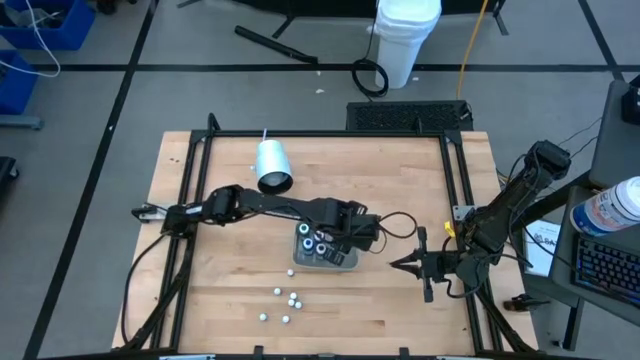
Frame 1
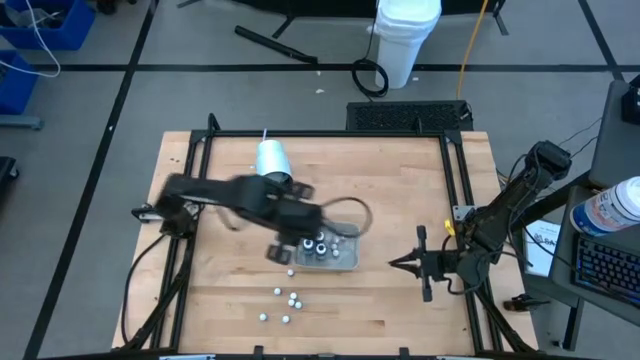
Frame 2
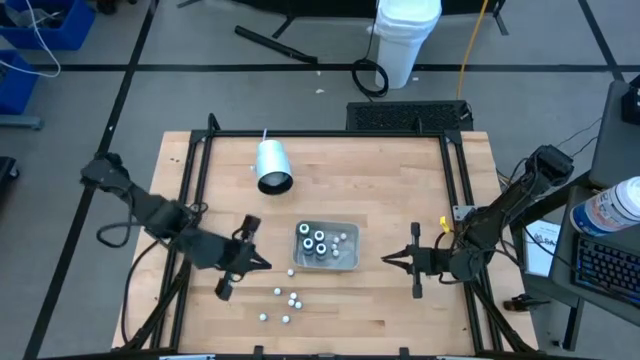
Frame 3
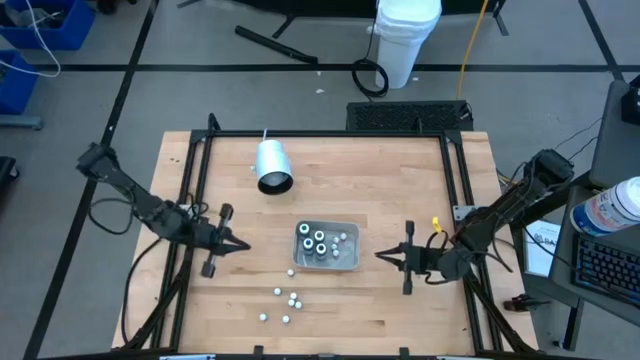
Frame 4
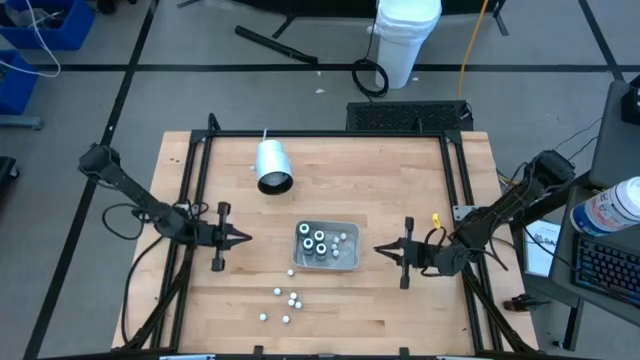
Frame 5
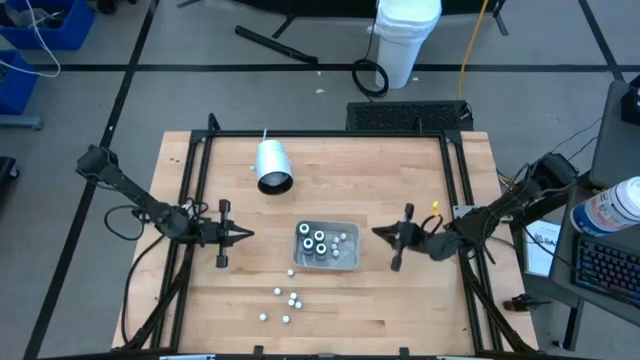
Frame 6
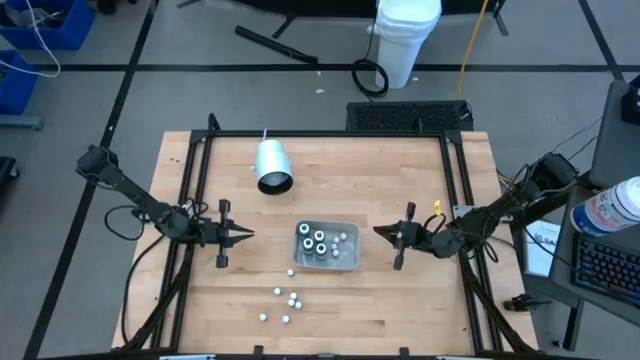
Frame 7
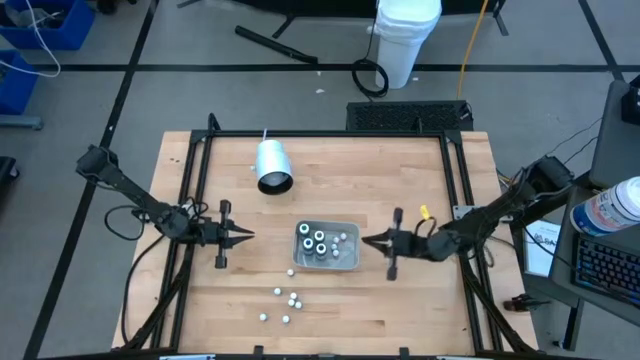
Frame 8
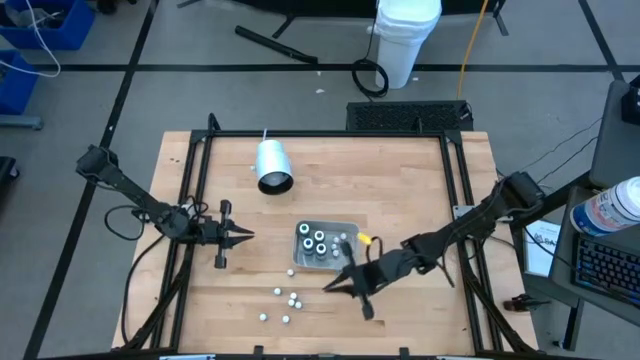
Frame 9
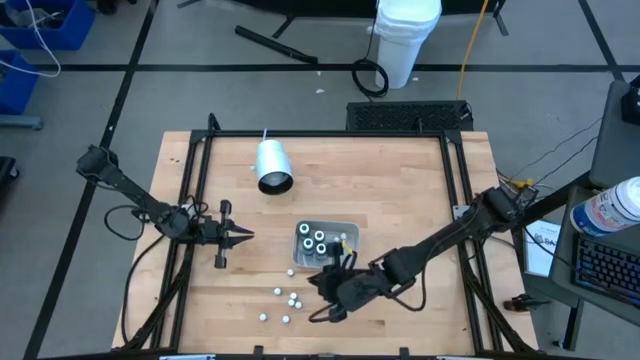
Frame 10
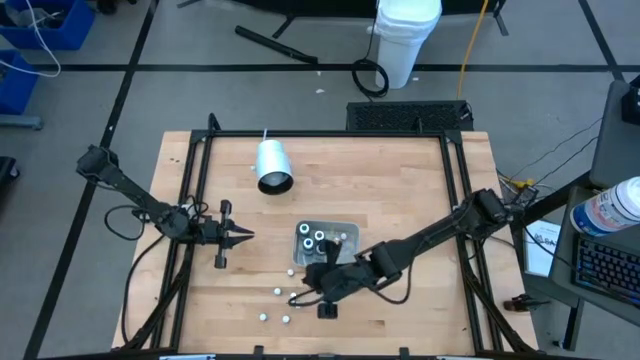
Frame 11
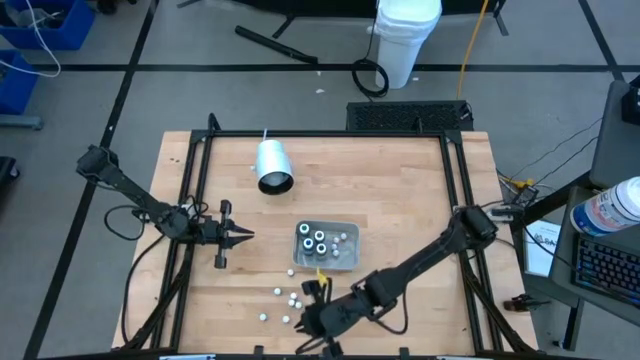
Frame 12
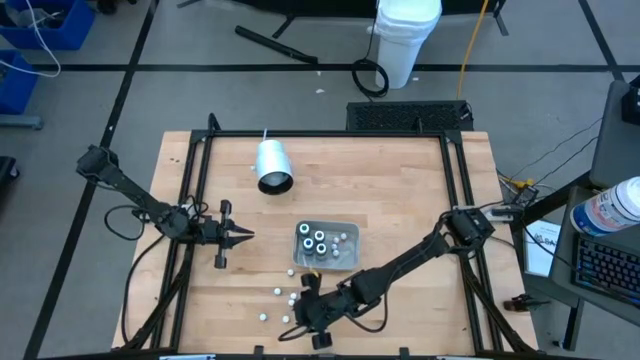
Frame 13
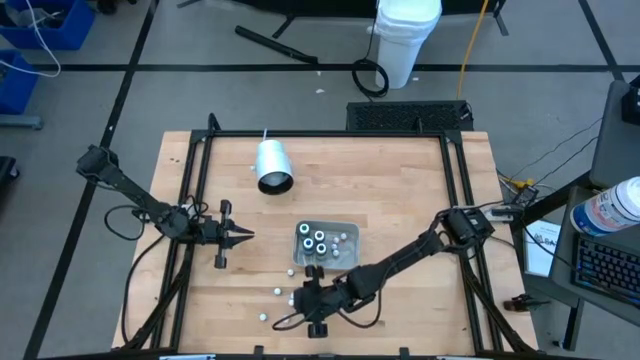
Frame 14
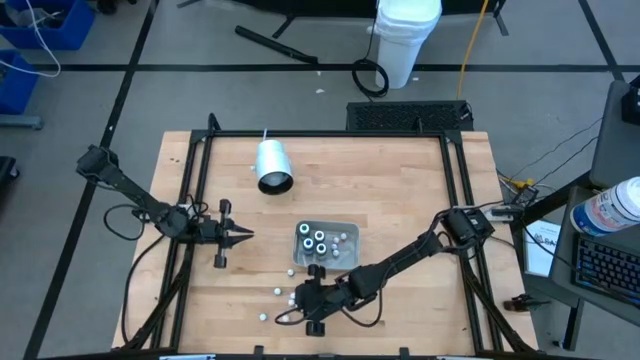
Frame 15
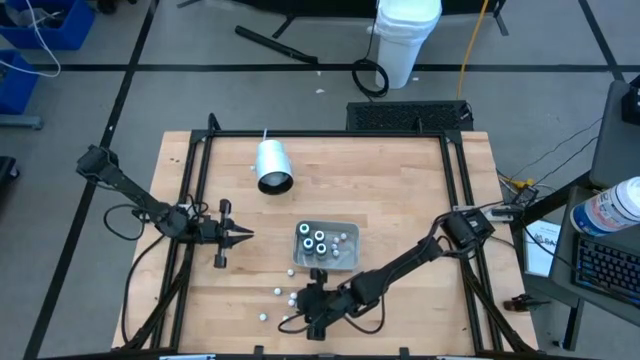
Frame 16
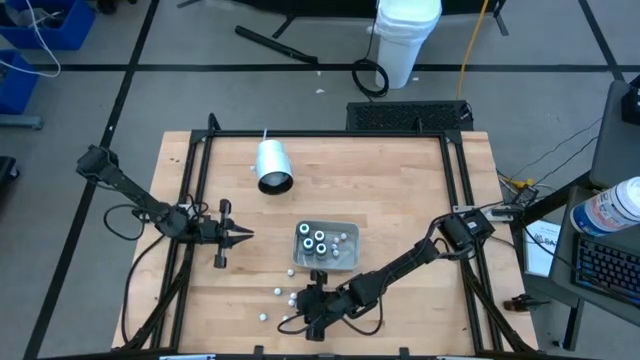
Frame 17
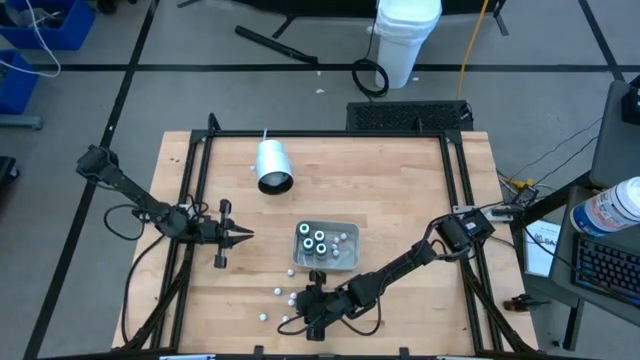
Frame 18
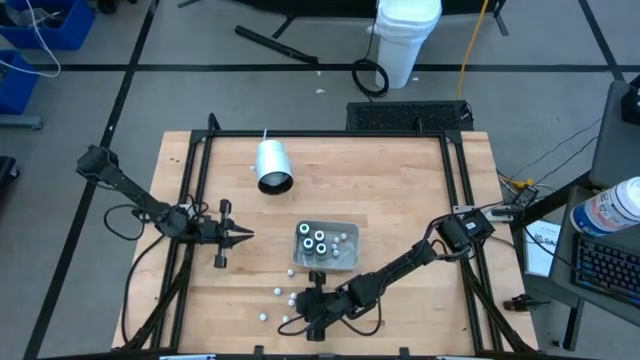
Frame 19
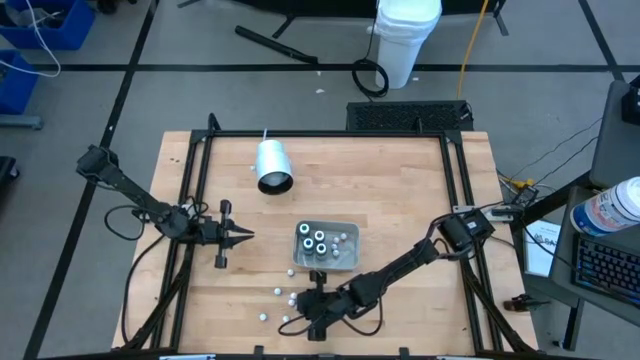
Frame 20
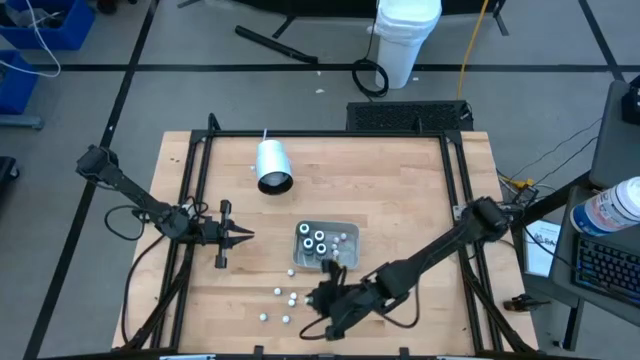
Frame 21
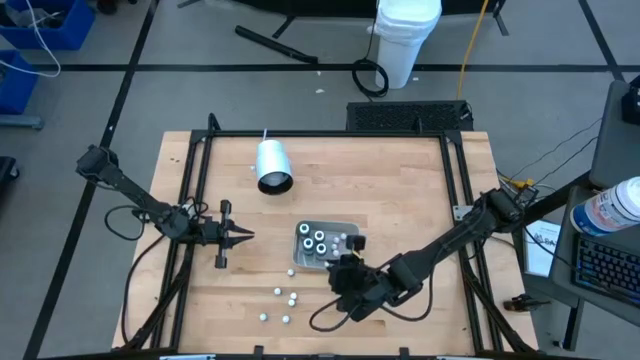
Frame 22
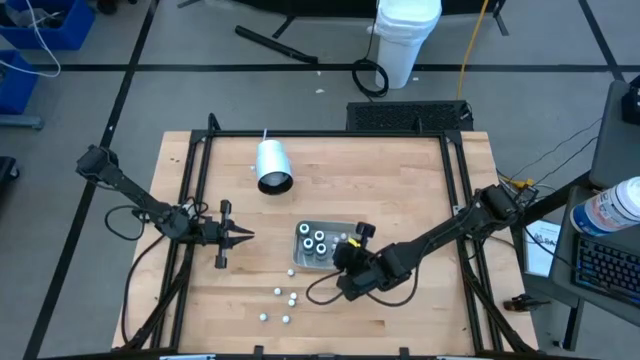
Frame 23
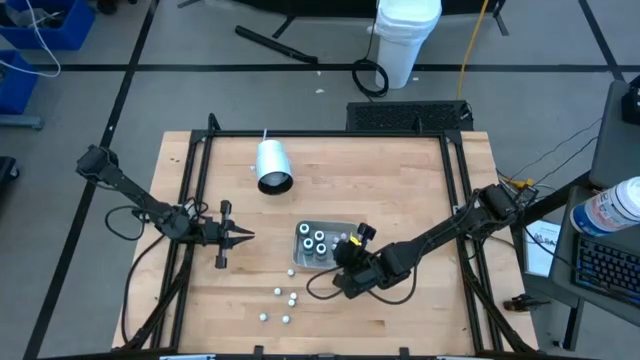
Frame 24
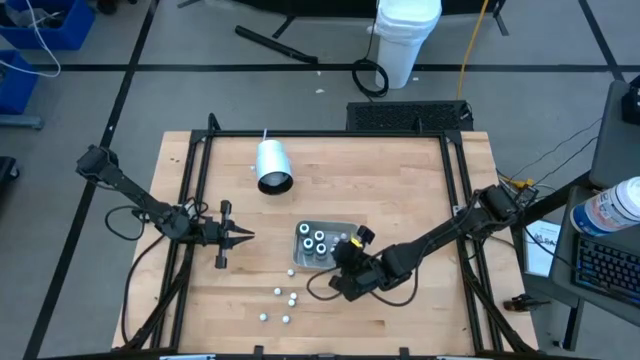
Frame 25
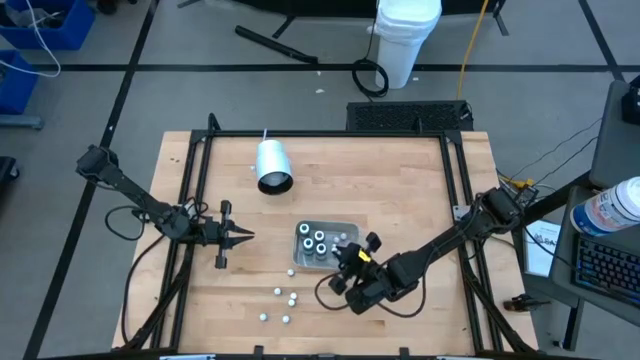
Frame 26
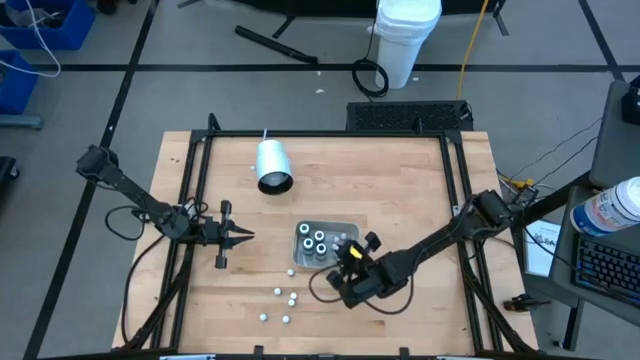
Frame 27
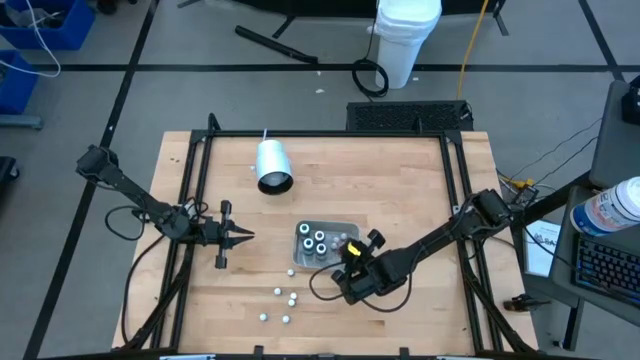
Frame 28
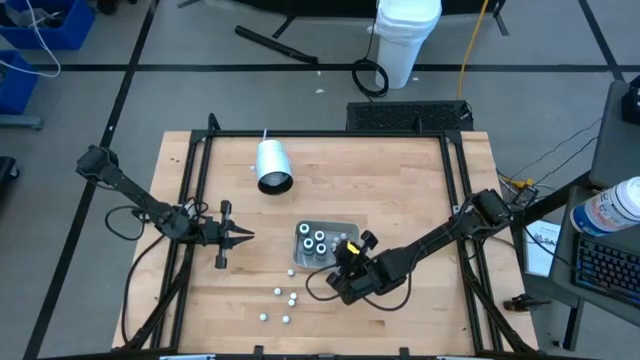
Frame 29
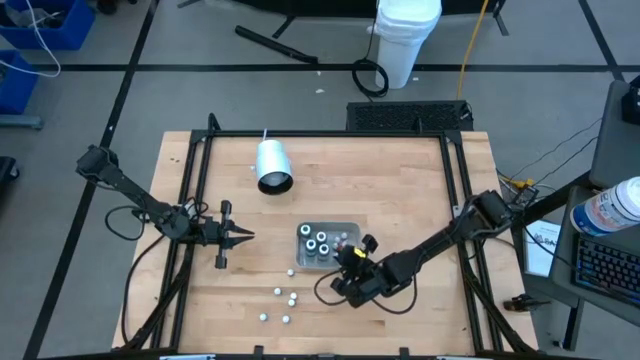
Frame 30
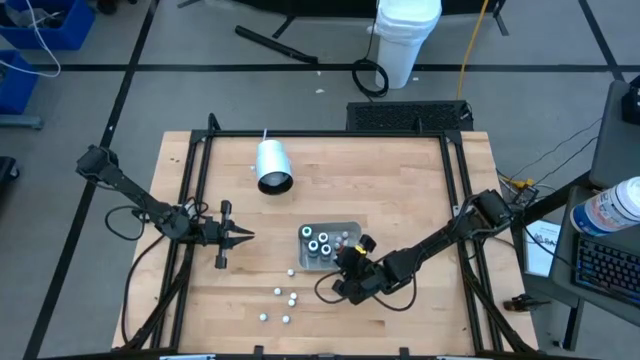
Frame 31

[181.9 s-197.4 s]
Task: Pick & Place food coloring
Put the green food coloring bottle into the gray bin
